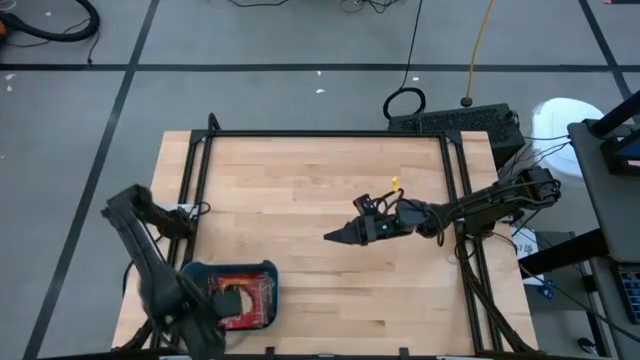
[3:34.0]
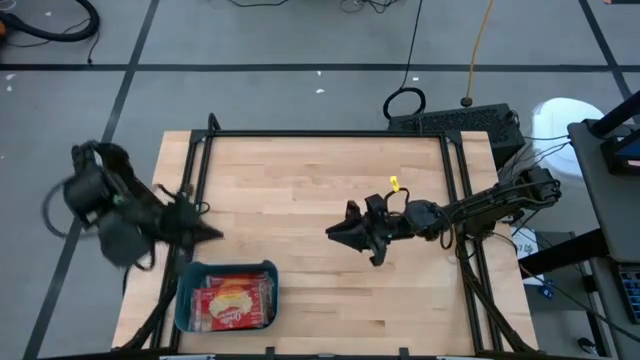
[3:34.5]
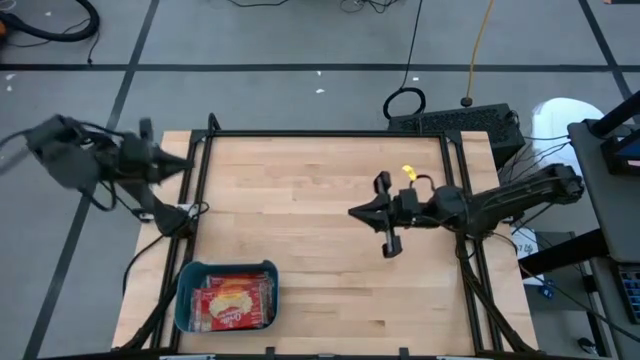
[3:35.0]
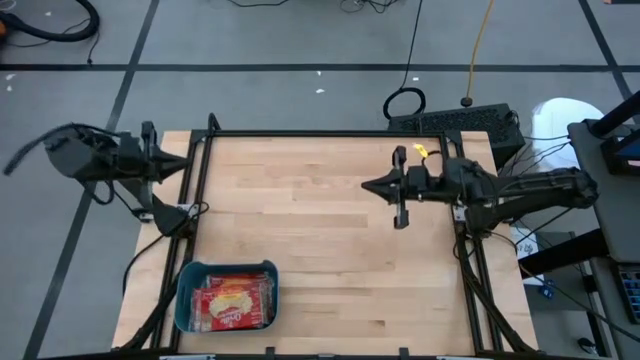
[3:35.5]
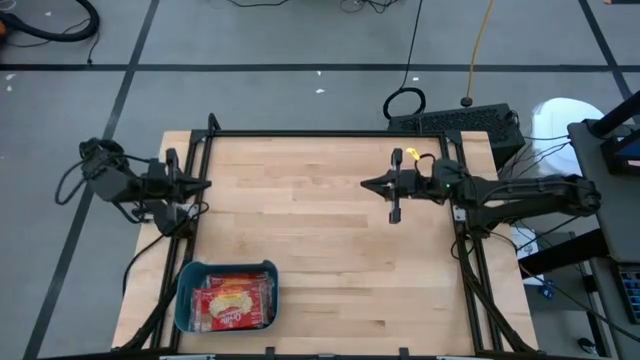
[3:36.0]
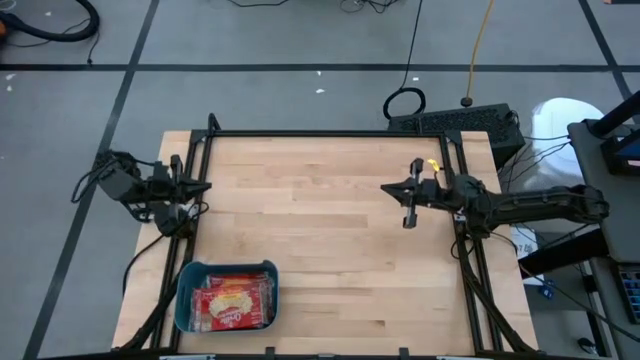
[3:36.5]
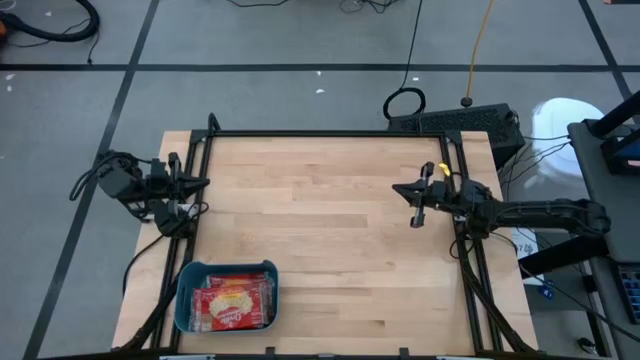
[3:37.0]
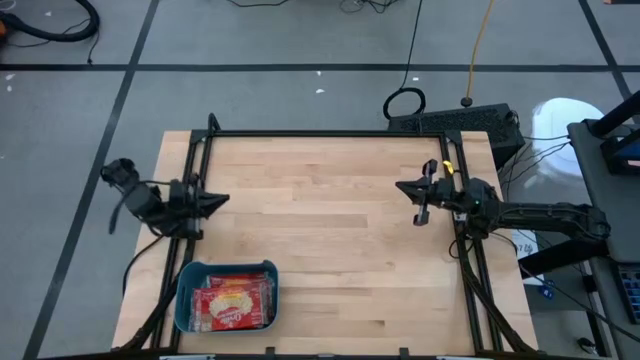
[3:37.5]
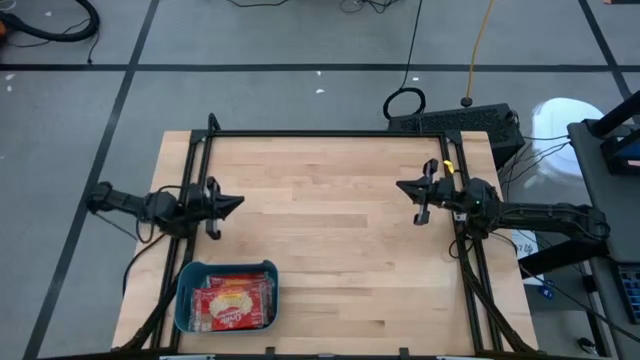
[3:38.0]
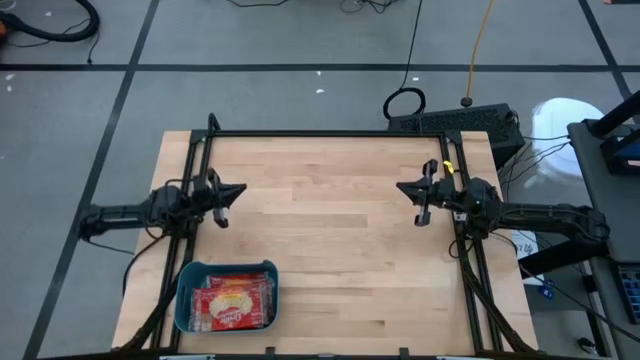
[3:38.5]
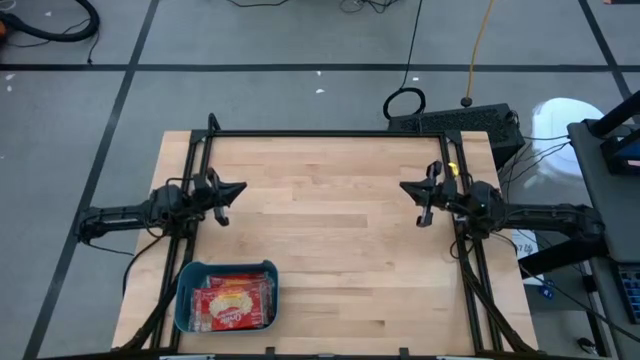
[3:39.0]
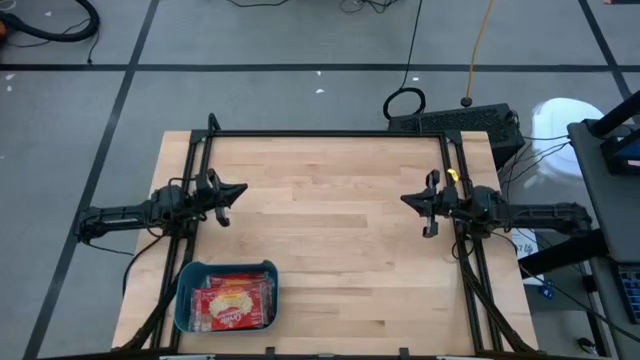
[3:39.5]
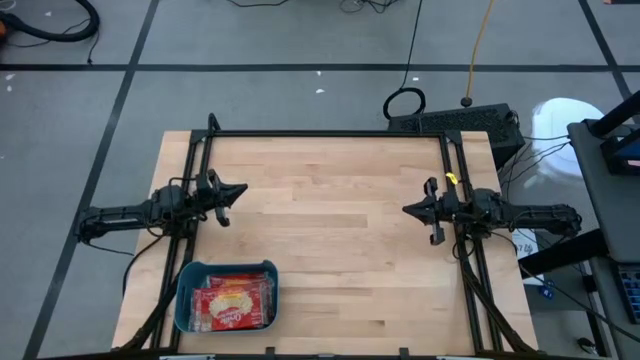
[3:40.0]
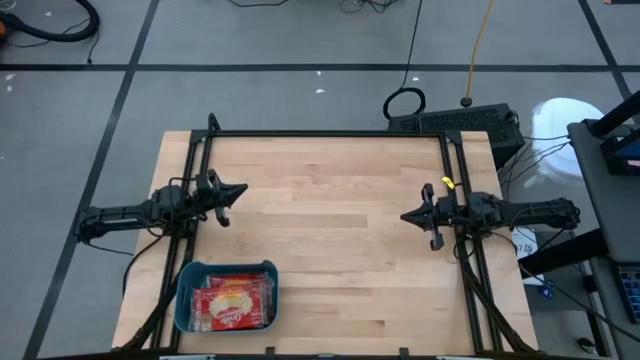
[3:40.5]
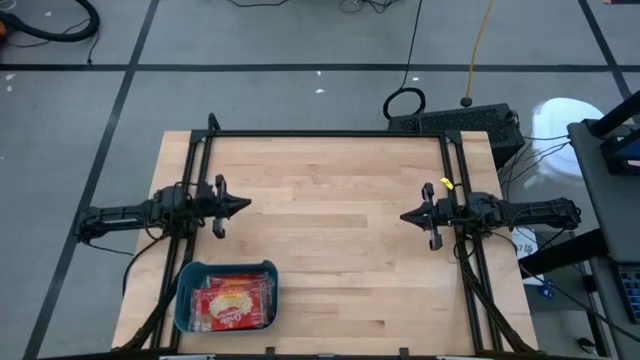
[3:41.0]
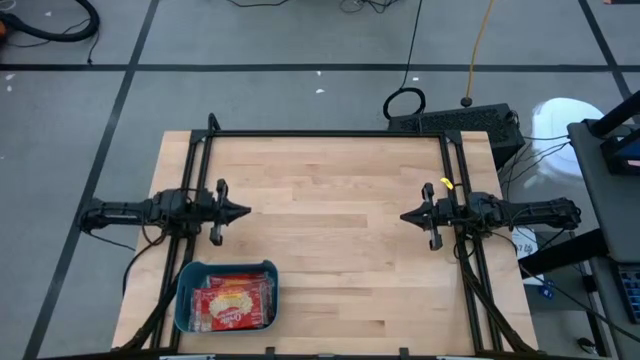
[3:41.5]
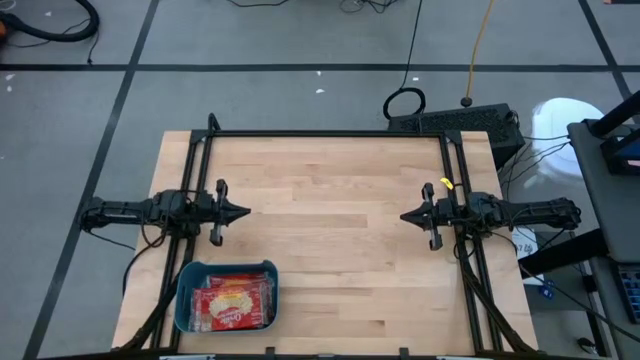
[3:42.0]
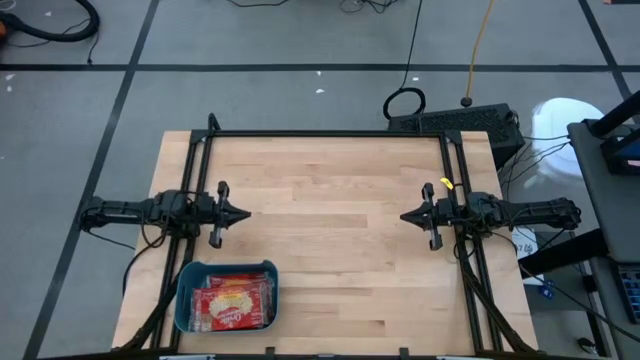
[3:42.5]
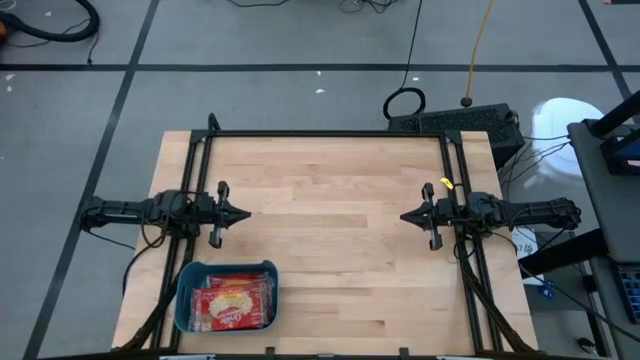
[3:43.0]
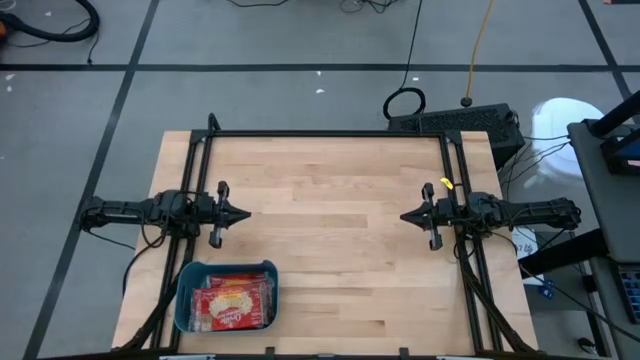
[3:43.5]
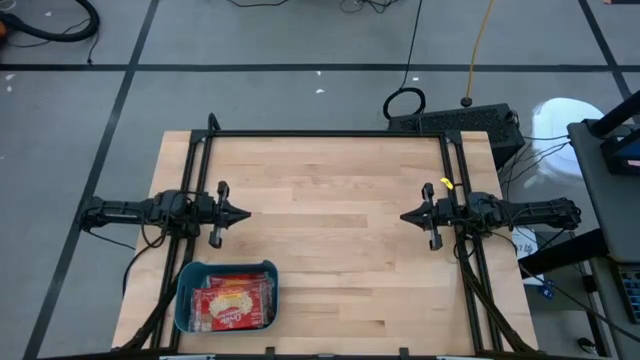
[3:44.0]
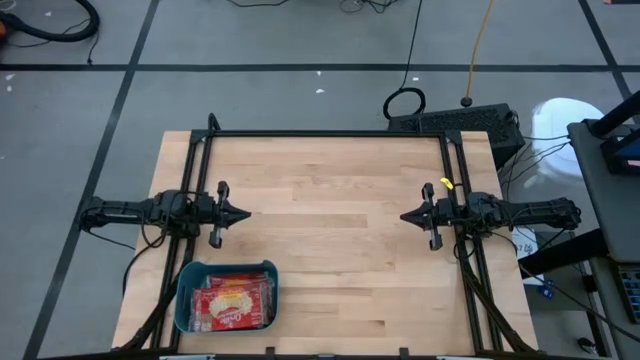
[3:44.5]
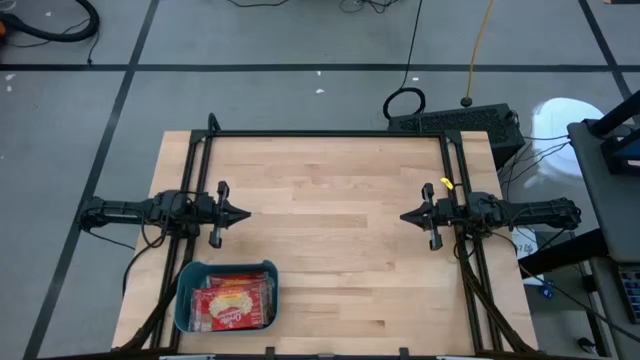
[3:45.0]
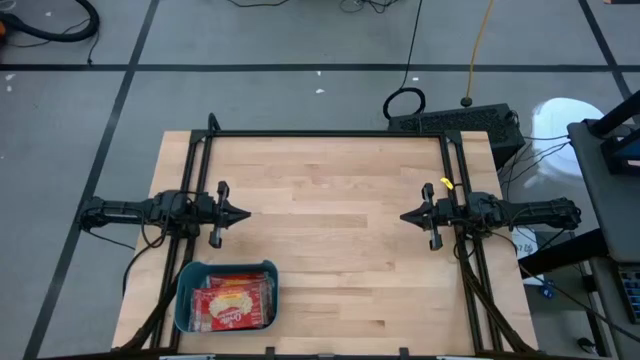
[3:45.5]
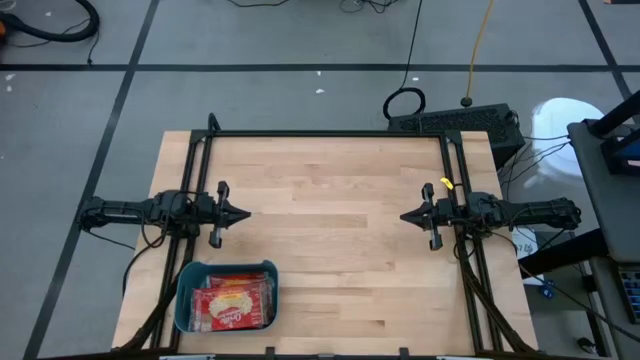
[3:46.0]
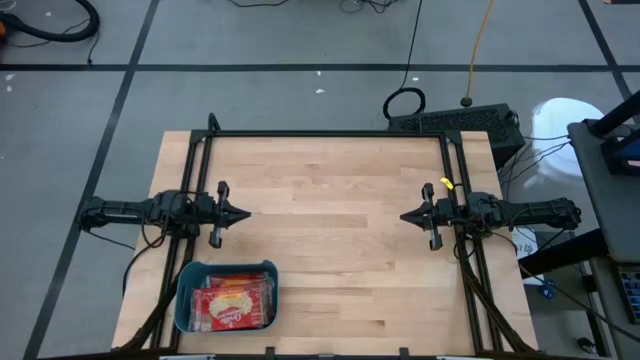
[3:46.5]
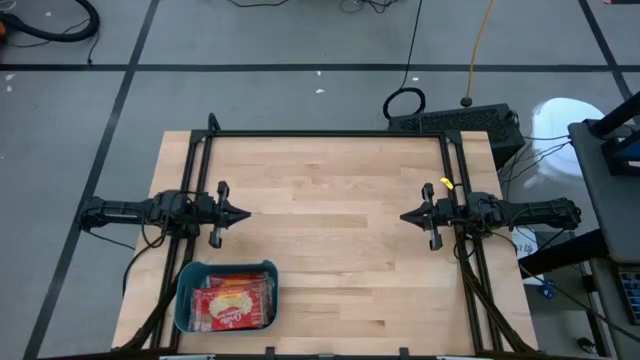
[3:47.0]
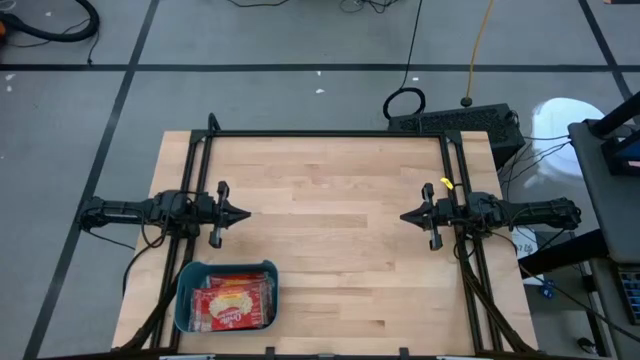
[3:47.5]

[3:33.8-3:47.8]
Task: Sort popcorn bags into baskets
Return to Home Position
